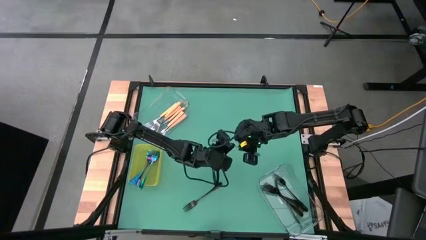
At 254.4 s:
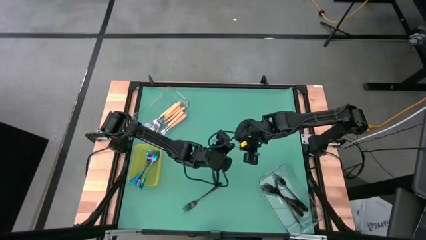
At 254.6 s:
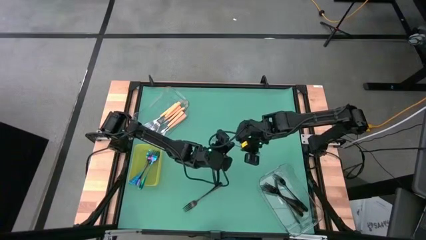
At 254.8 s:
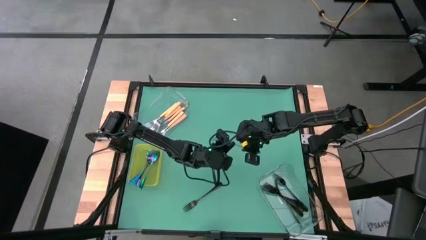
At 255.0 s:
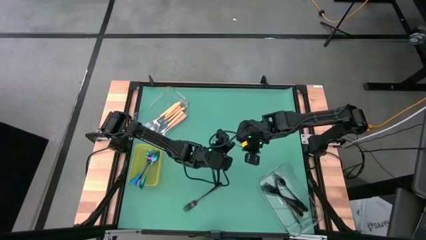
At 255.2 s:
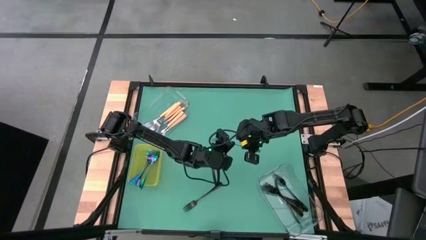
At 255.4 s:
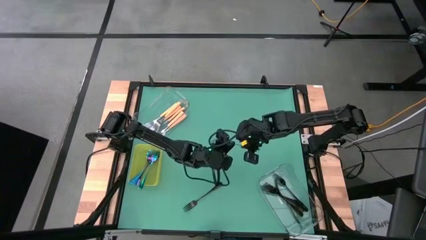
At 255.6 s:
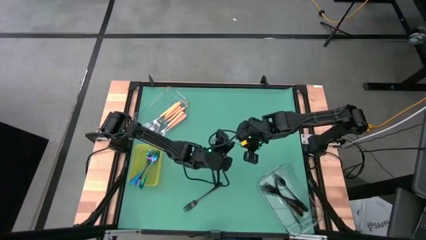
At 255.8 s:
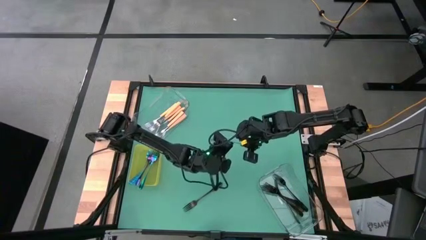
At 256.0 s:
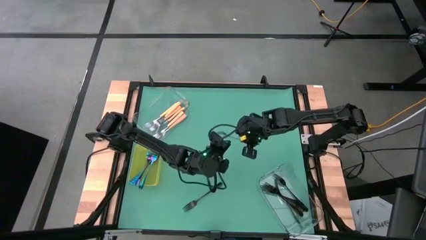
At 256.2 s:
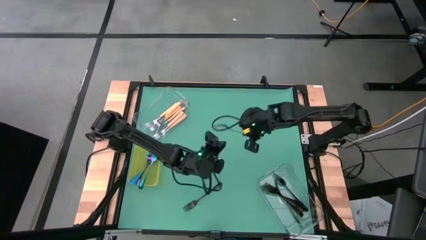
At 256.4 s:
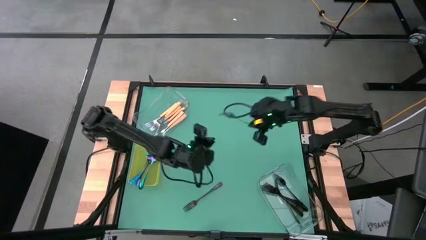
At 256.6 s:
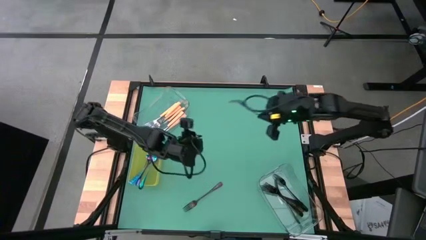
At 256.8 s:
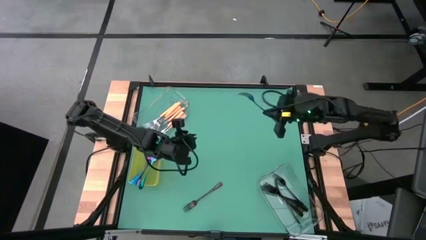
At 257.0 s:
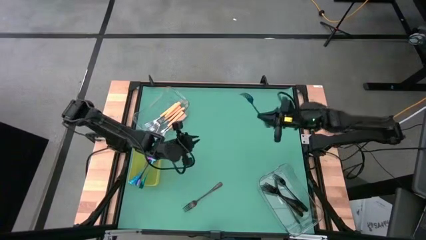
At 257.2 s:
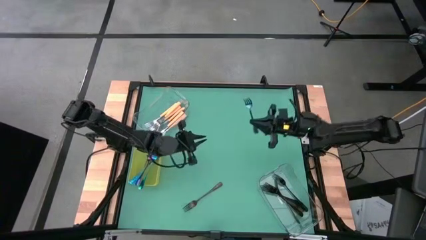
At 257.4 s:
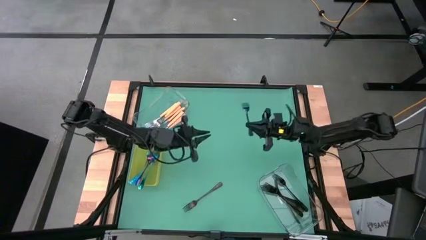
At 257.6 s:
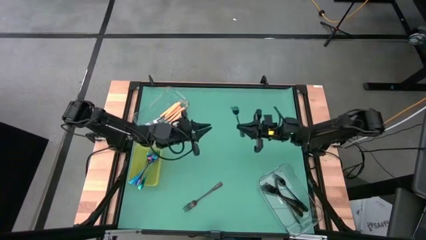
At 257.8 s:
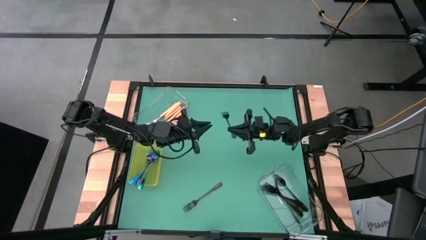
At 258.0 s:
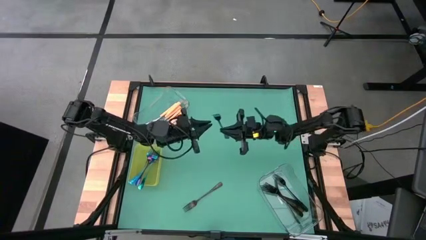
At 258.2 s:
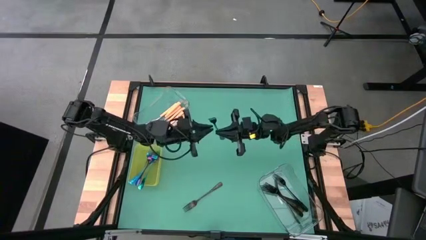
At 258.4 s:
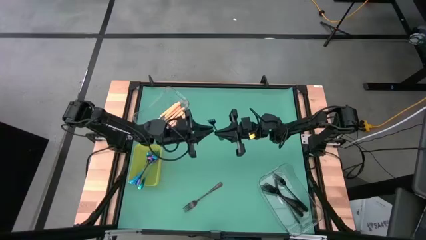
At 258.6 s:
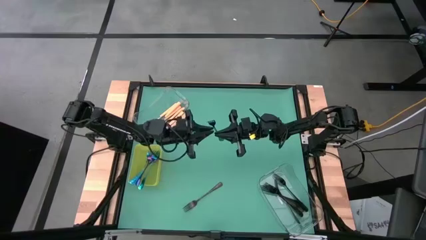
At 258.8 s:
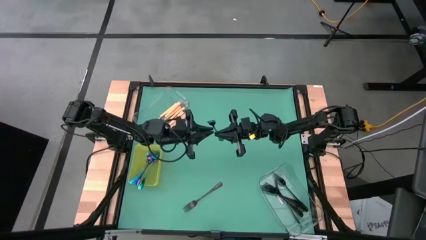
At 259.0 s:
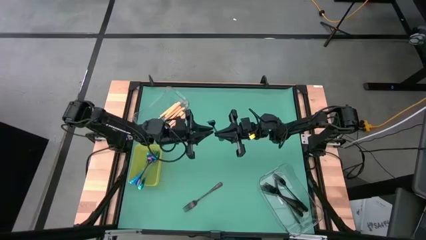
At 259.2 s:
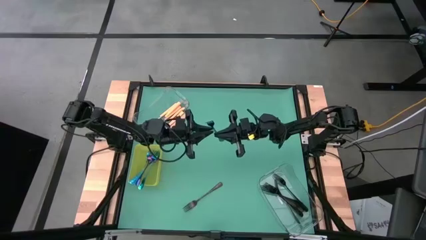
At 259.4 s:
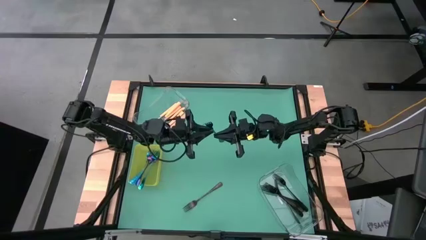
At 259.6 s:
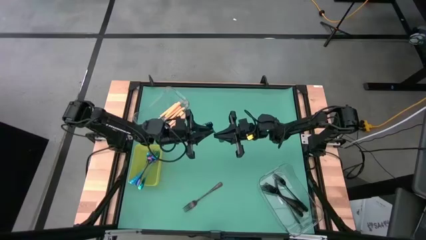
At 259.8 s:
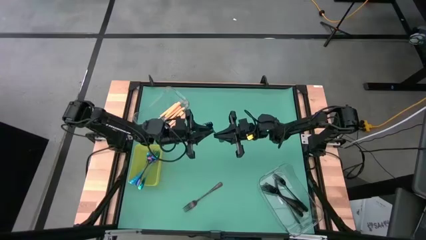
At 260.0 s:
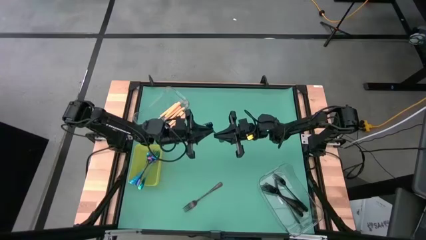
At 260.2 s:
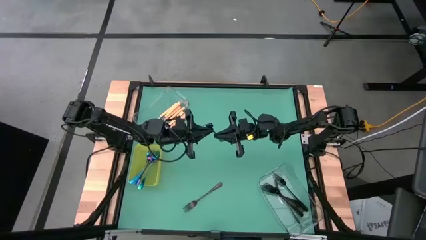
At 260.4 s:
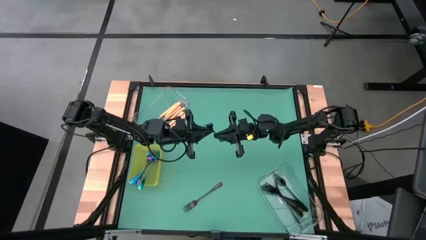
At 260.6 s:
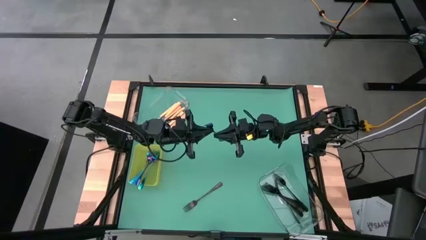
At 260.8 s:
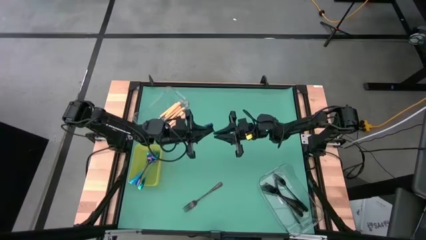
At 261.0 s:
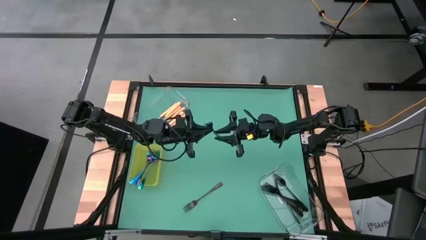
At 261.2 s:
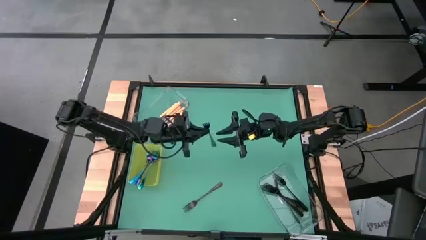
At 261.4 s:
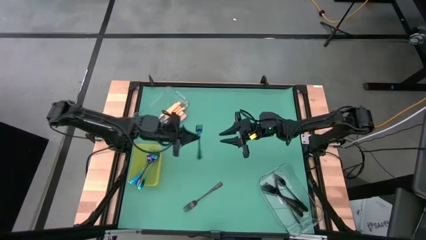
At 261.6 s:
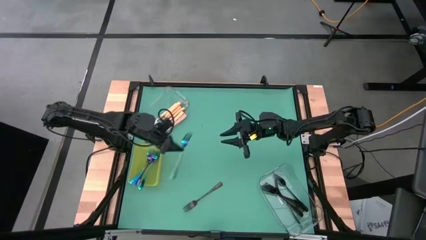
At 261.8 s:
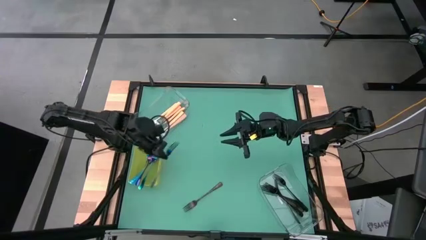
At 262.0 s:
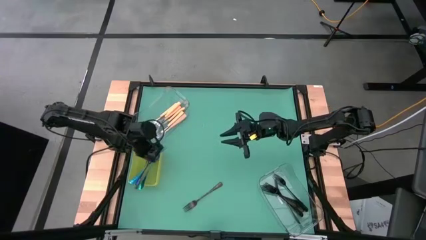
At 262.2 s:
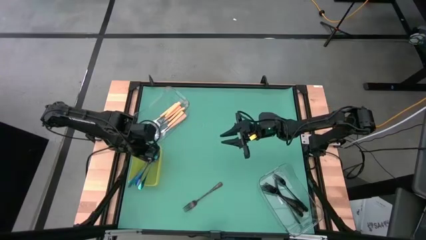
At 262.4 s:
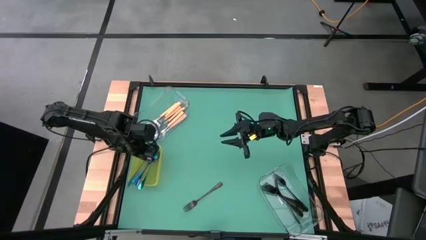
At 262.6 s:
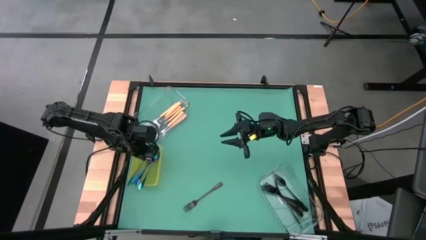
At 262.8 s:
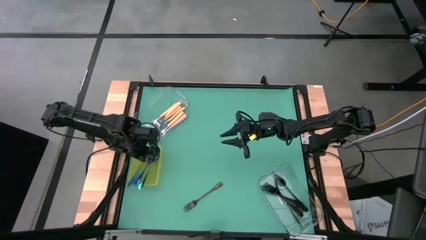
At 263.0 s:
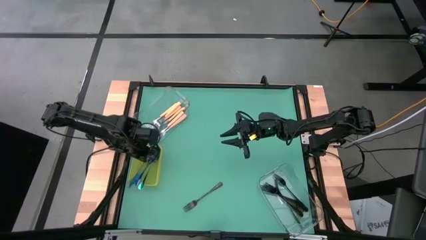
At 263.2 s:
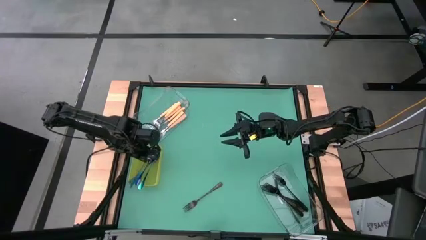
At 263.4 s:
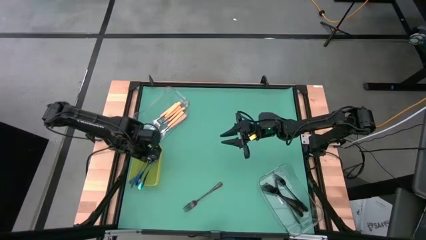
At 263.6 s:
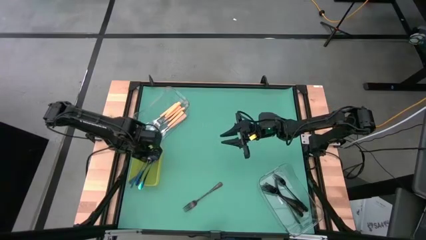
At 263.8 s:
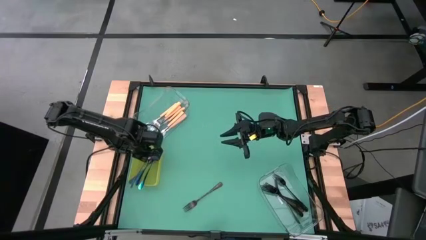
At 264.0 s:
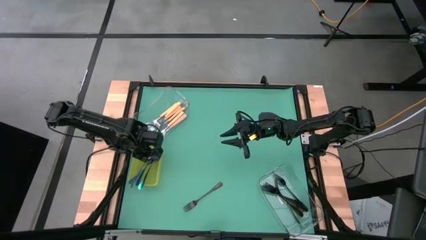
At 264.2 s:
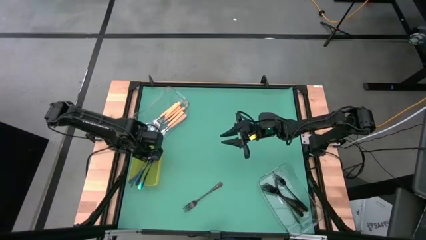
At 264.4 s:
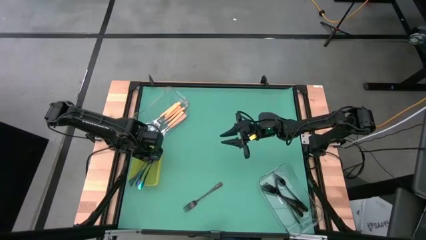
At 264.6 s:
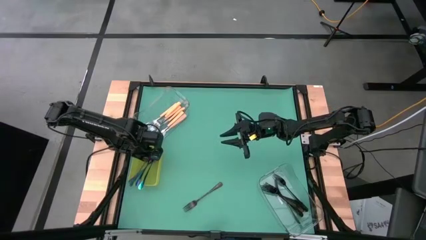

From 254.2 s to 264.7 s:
Task: Sort silverware by color (type)
Put the blue fork in the yellow bin

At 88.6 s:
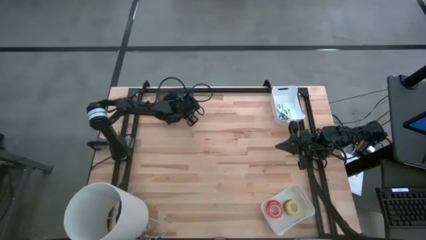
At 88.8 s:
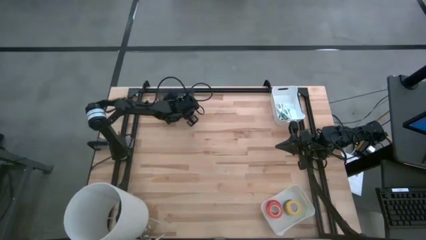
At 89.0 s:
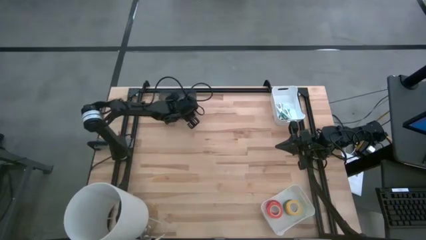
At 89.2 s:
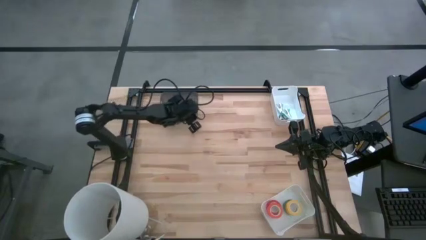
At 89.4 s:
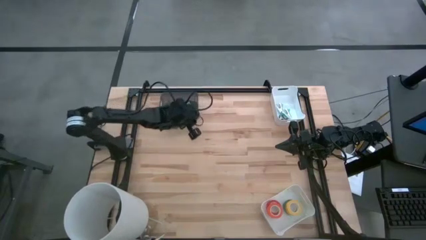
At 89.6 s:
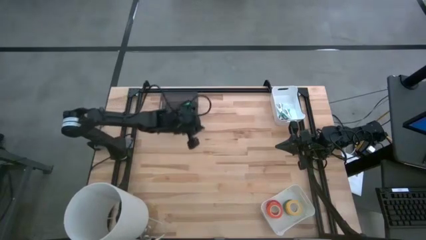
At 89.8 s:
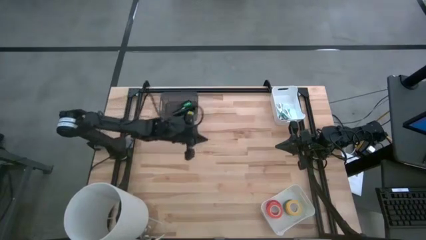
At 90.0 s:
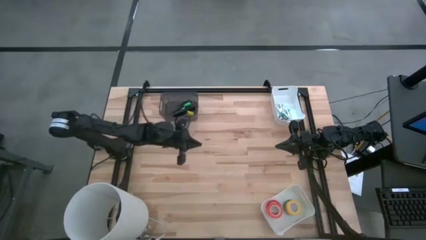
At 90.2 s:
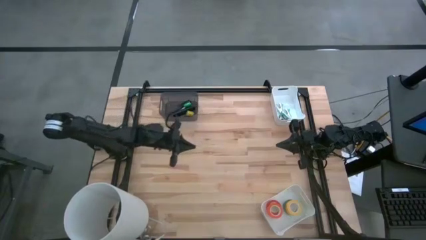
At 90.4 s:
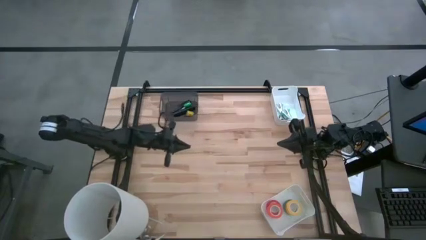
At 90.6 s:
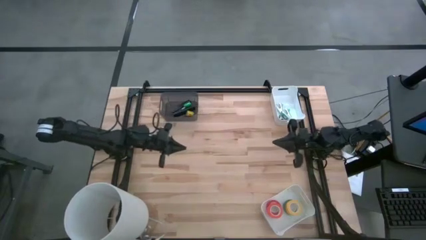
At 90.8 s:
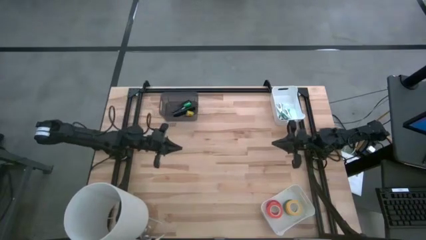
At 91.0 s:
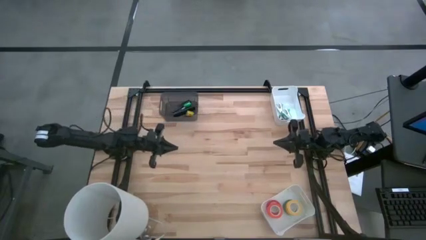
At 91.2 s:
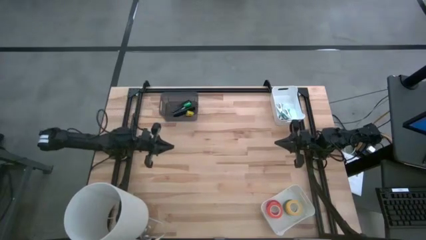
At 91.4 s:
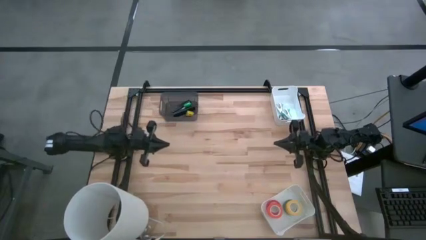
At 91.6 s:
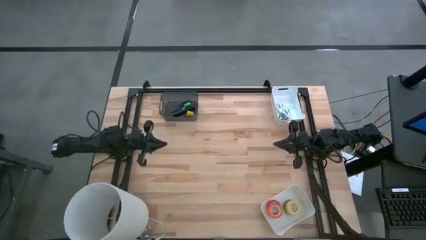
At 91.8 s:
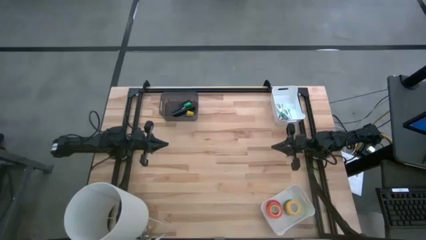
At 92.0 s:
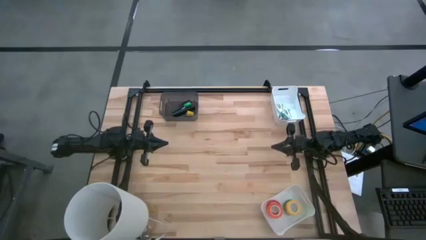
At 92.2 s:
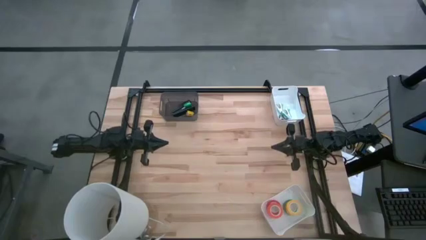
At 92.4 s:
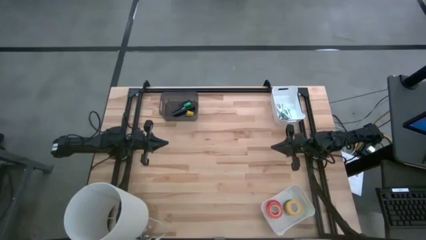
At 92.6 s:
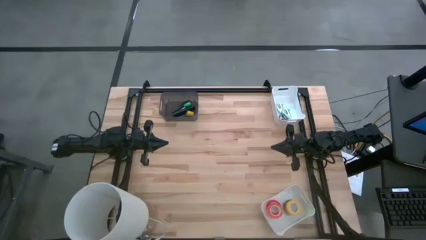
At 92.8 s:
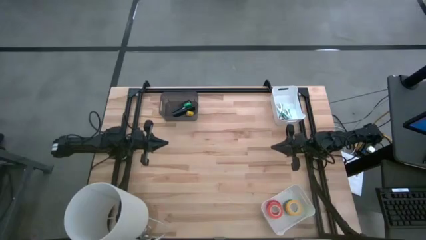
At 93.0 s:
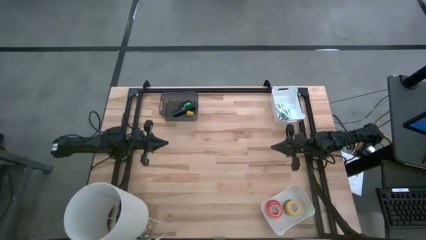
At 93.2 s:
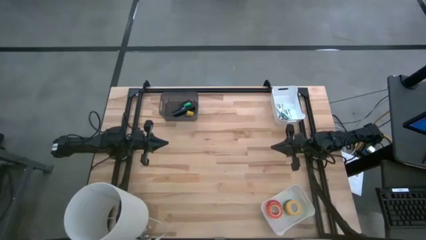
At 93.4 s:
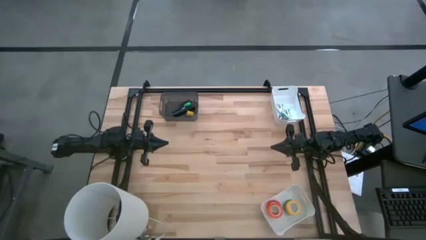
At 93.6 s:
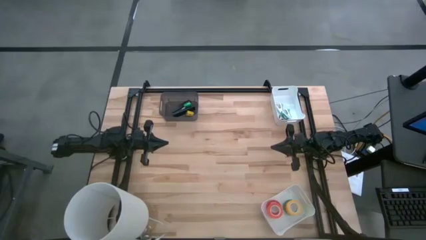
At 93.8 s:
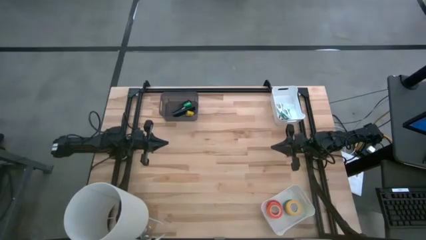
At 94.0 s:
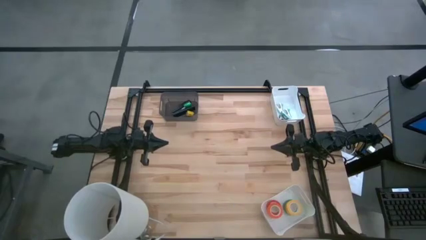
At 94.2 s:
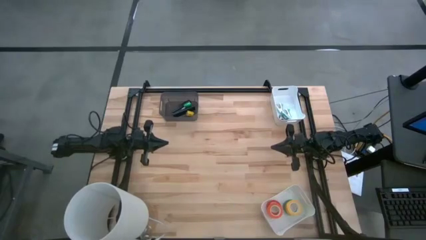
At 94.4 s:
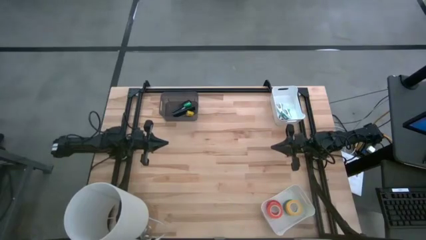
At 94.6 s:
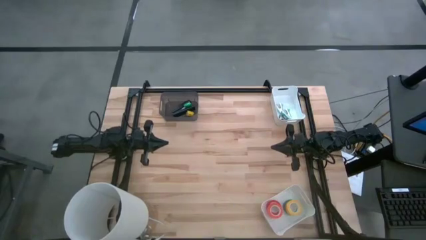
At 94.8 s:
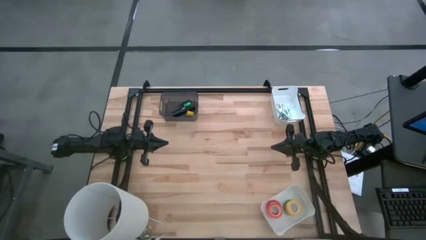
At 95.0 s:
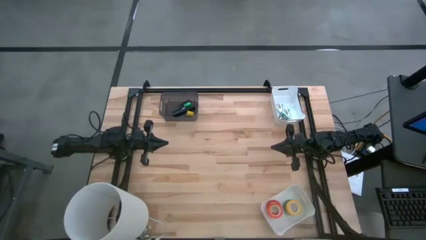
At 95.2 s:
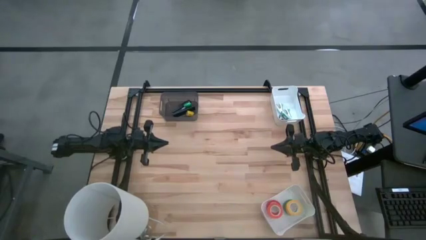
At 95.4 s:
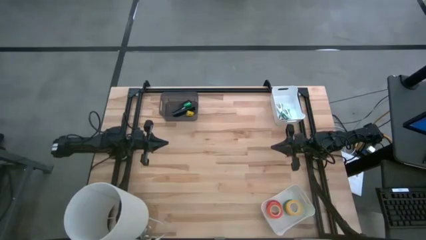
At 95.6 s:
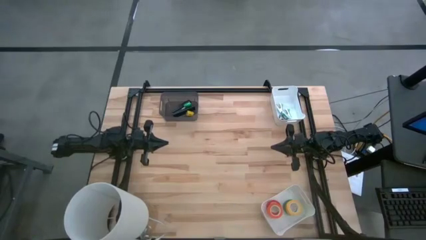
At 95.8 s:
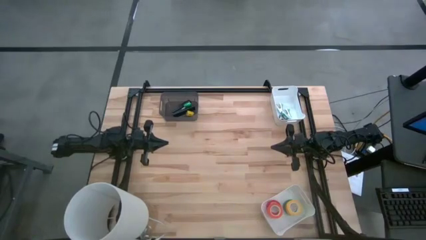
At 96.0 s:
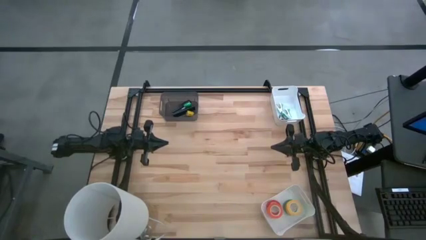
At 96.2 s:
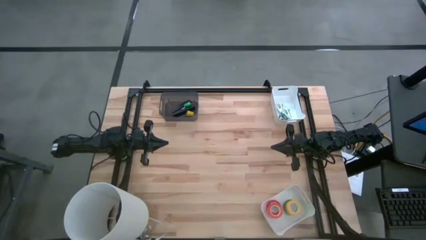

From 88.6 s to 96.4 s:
Task: Pick and place Stapler, Stapler remover, tape
Return to Home Position
